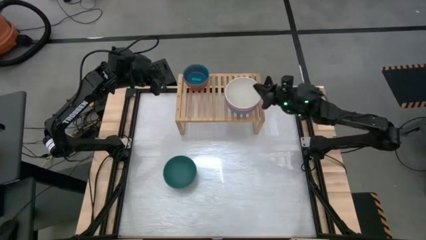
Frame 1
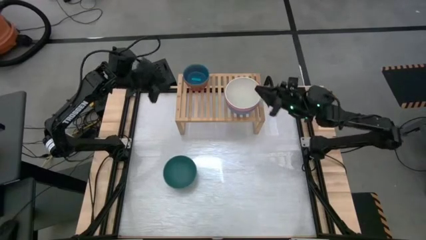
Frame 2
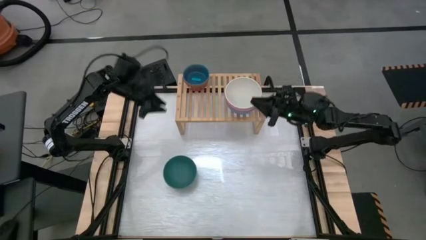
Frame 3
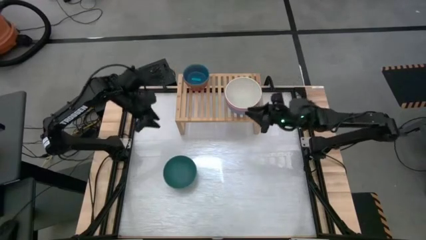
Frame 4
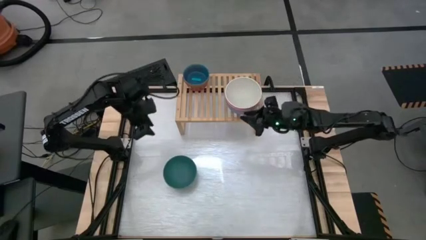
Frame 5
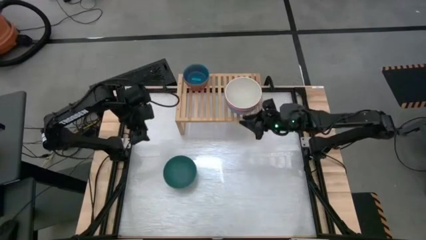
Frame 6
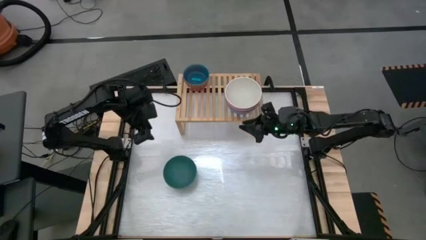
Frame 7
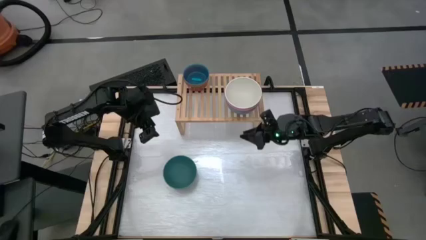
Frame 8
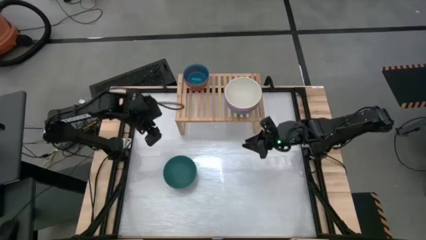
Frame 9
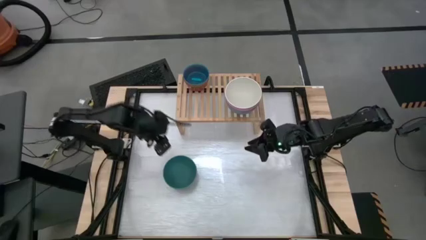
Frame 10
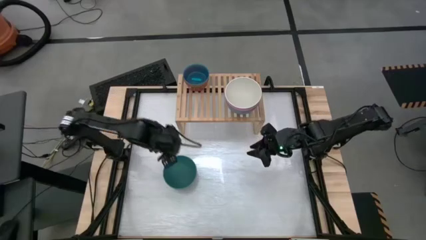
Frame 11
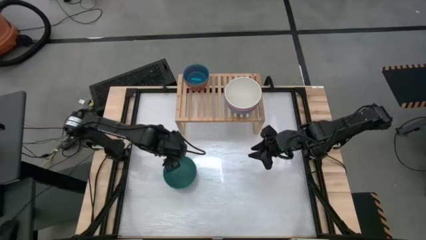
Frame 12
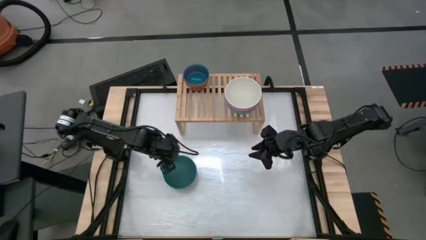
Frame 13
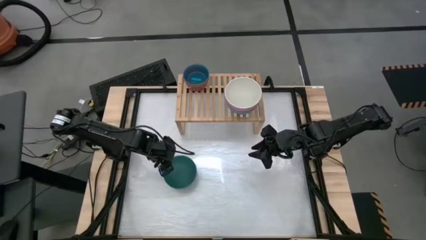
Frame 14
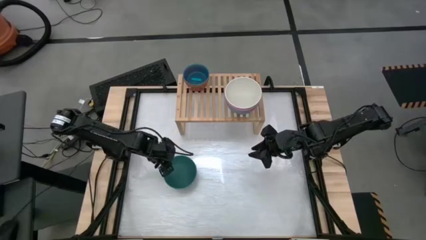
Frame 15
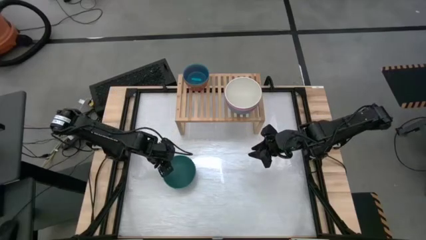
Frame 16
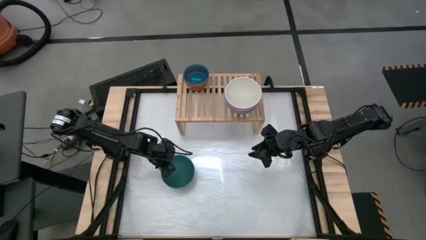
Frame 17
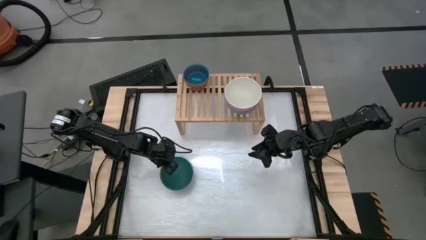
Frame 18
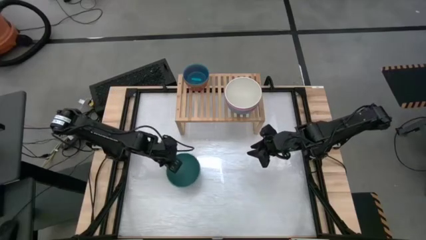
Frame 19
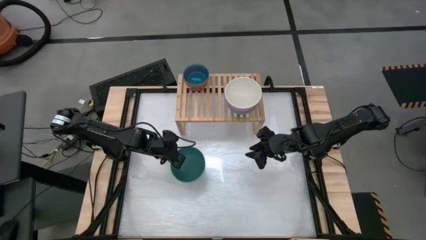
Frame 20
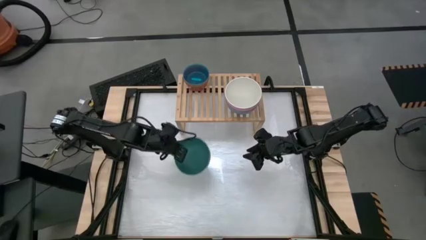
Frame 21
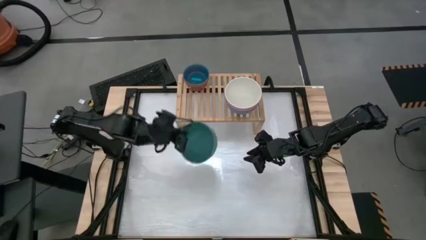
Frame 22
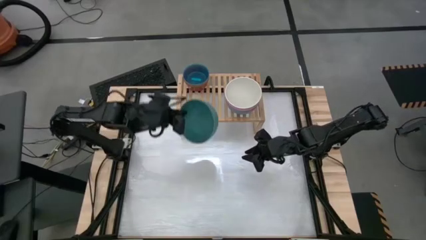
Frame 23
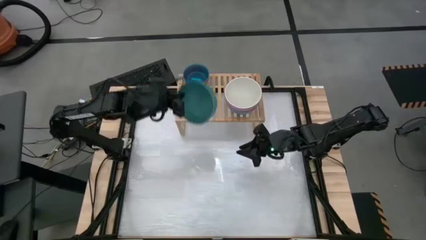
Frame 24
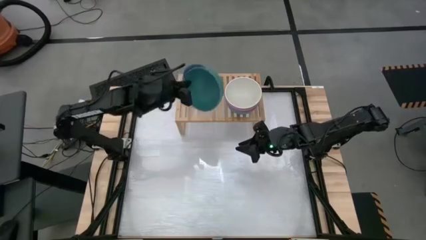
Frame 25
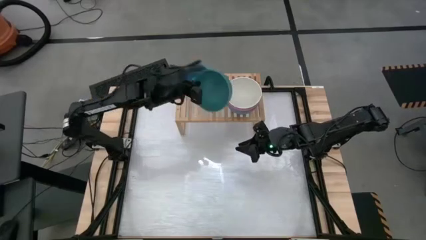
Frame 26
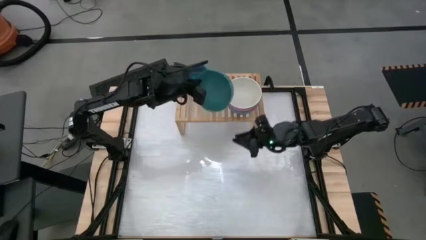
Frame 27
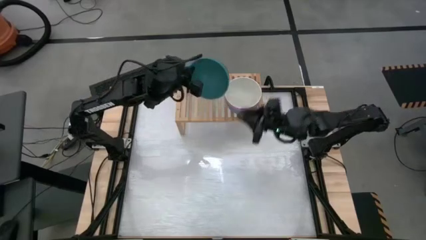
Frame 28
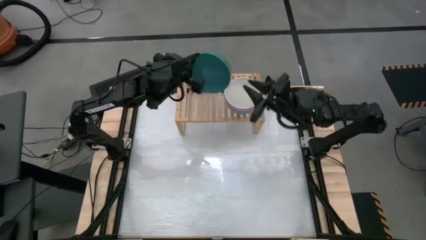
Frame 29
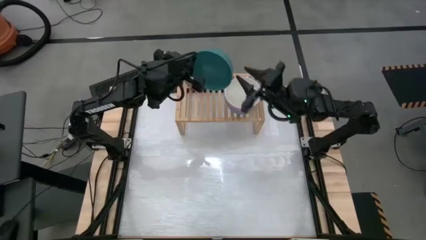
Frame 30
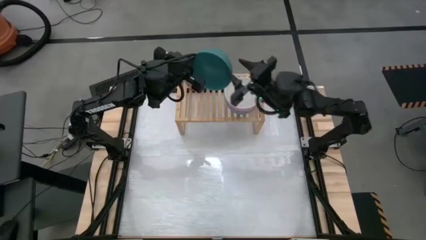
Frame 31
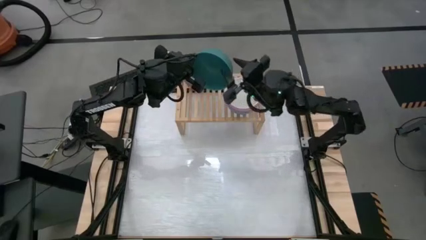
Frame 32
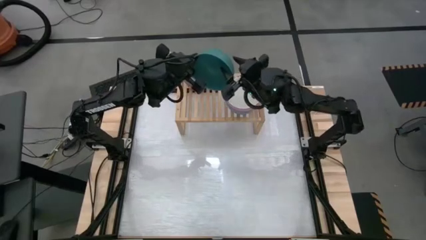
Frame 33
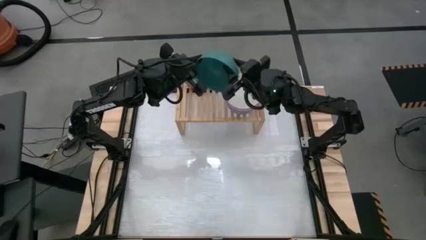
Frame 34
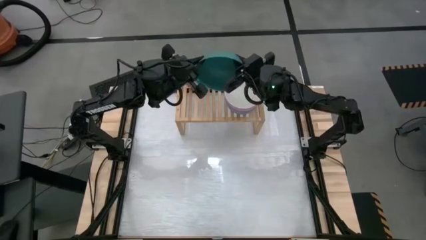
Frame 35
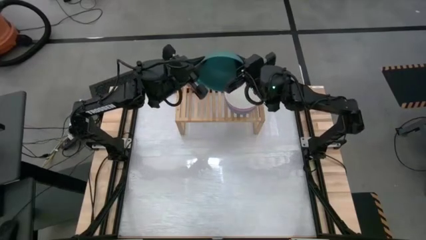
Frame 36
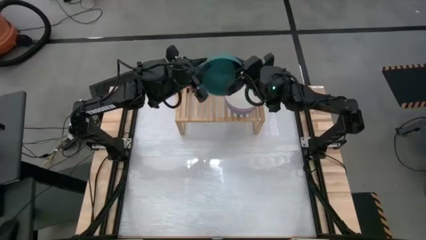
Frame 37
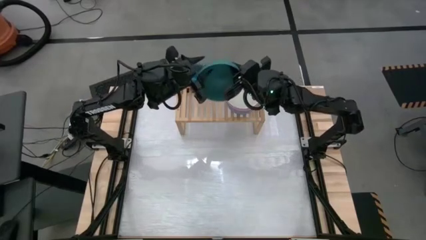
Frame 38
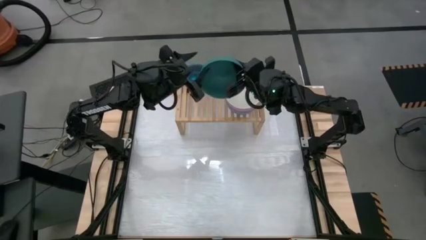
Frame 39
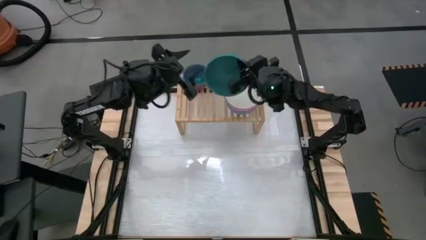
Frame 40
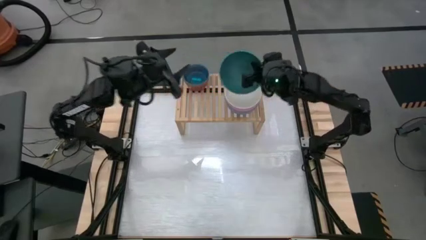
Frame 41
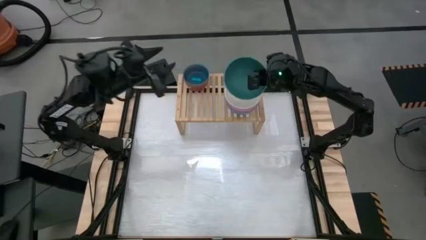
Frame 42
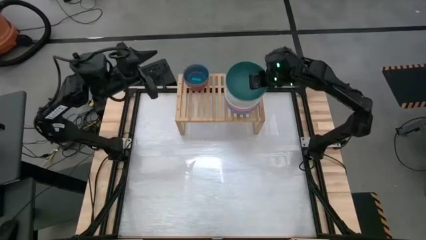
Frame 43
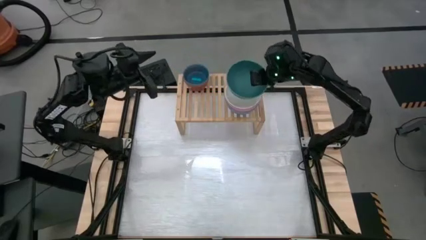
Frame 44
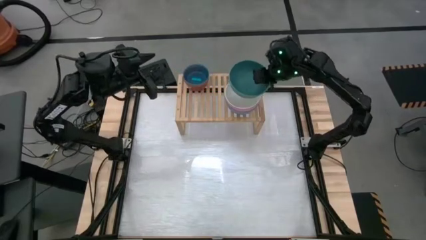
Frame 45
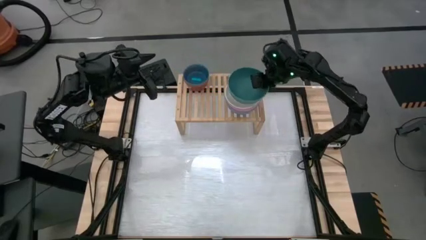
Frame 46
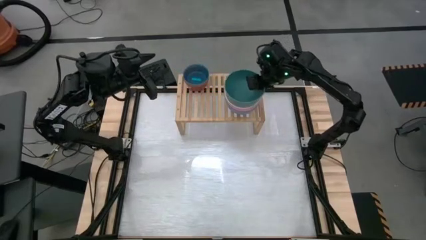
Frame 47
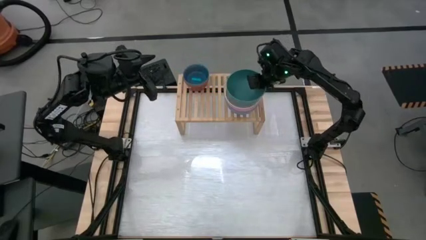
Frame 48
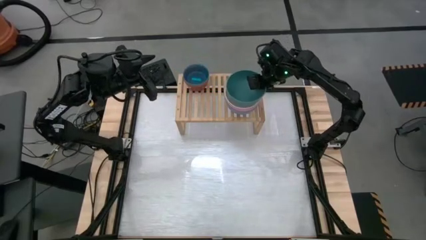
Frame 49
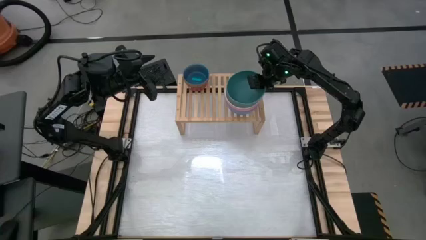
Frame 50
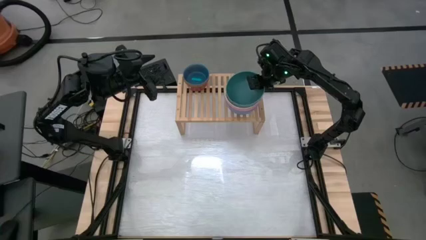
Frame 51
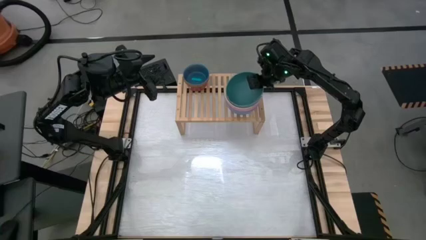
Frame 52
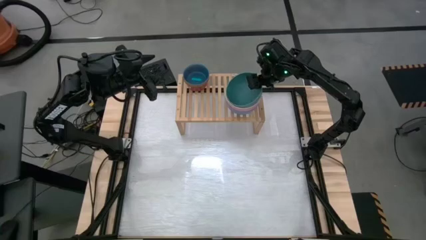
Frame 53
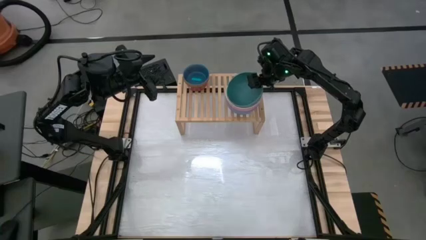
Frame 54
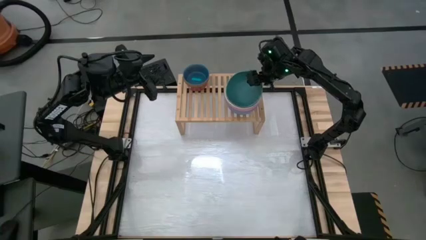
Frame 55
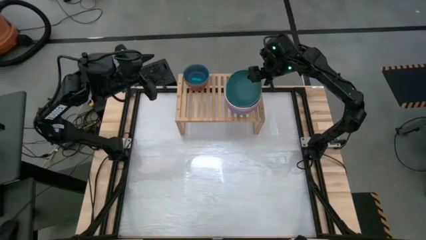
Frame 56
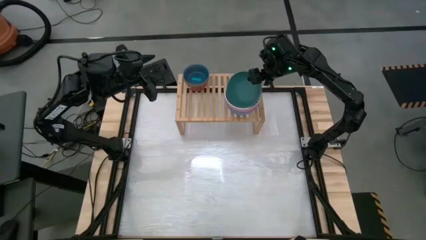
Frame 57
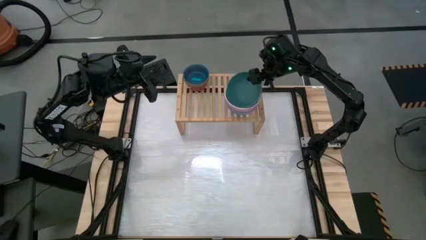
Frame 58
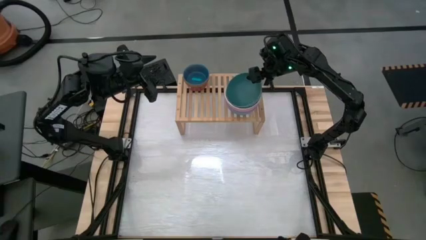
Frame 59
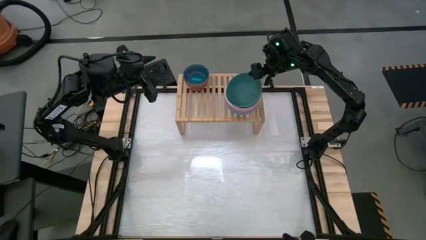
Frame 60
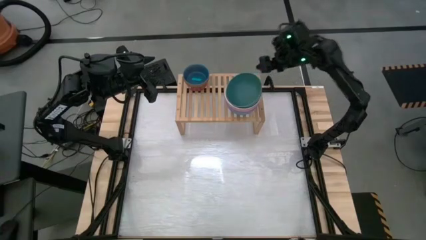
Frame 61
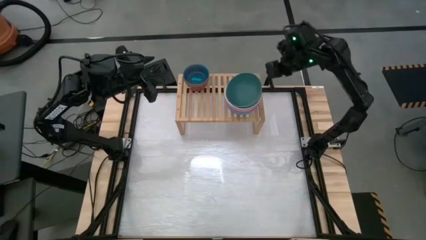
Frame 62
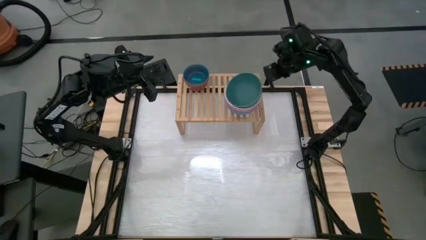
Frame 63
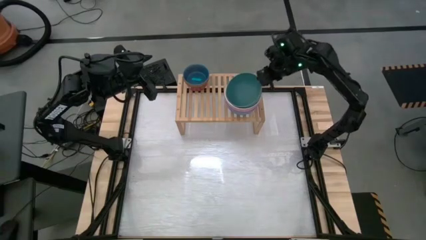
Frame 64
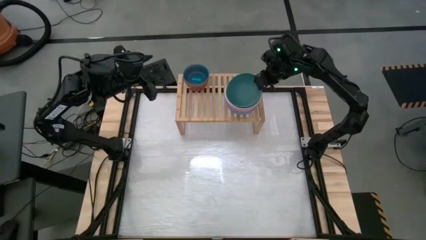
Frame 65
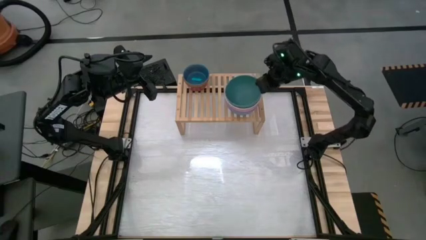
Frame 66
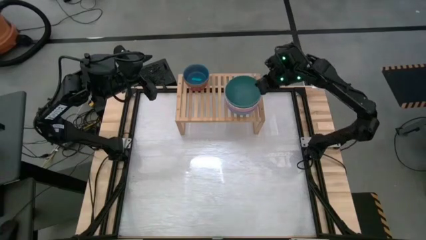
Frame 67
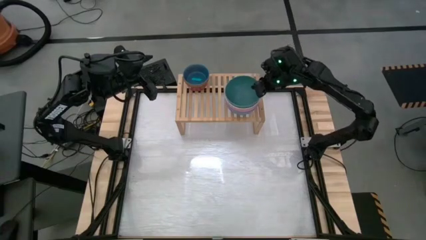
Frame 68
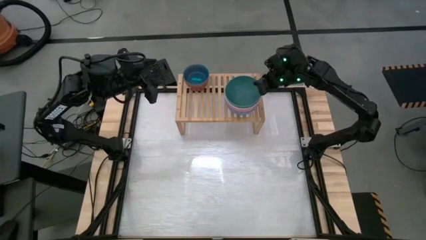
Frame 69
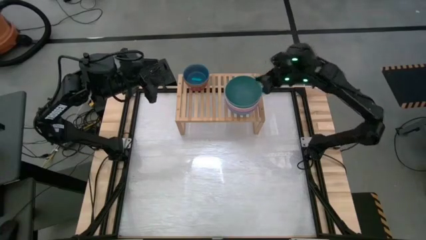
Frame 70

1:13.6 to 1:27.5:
Task: Place and stack bowls onto a shelf
Stack the green bowl on top of the white bowl on the shelf

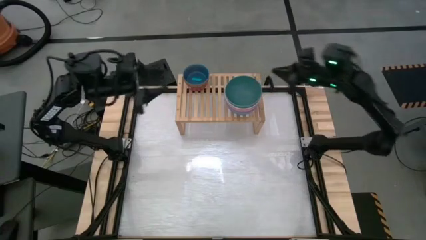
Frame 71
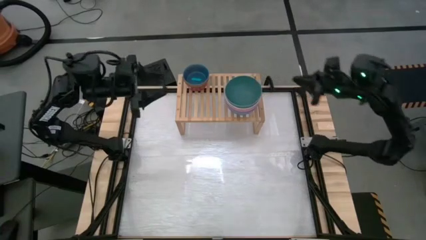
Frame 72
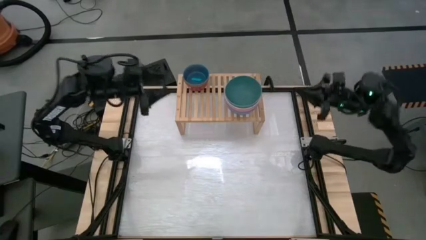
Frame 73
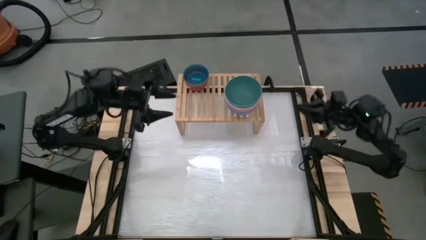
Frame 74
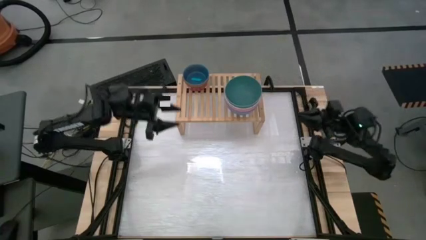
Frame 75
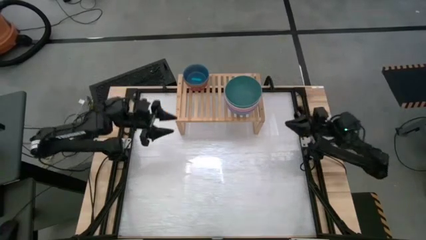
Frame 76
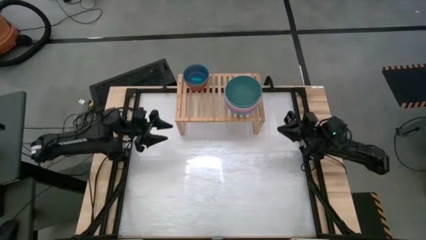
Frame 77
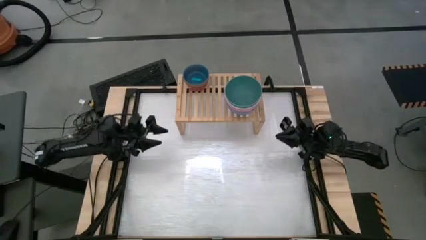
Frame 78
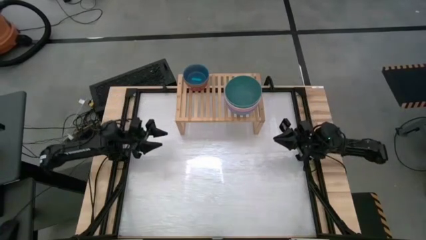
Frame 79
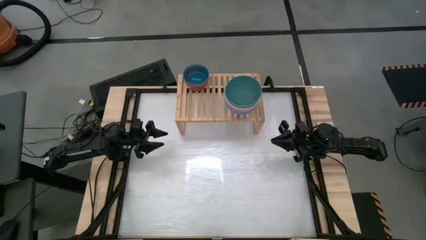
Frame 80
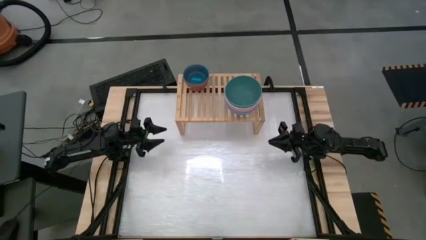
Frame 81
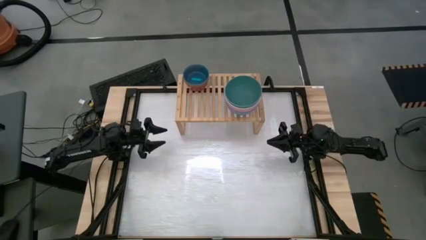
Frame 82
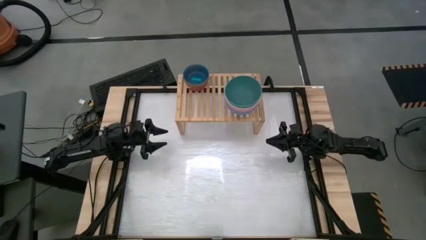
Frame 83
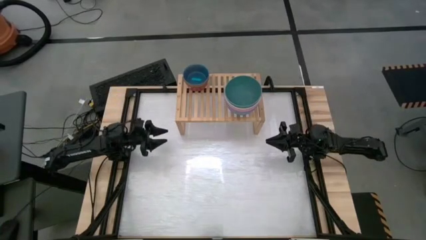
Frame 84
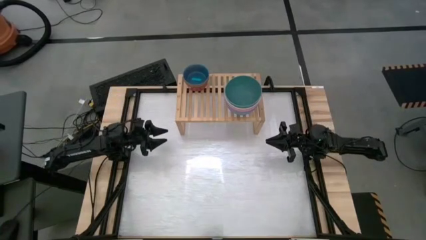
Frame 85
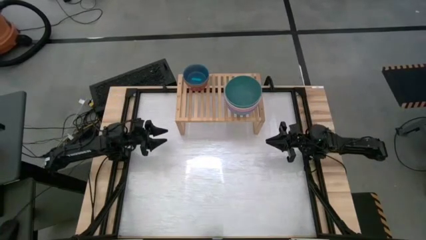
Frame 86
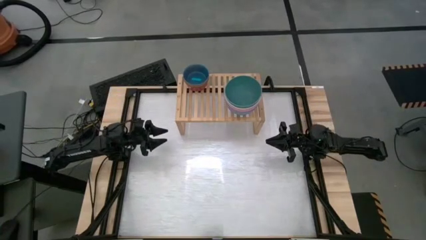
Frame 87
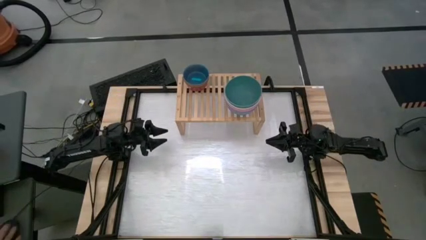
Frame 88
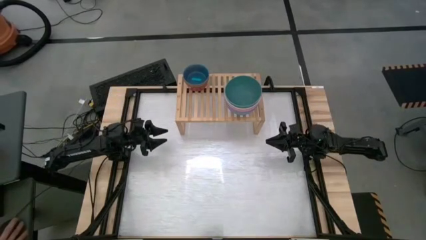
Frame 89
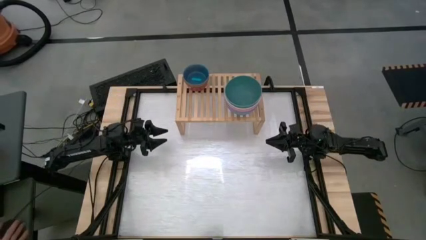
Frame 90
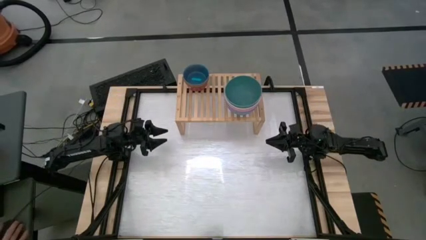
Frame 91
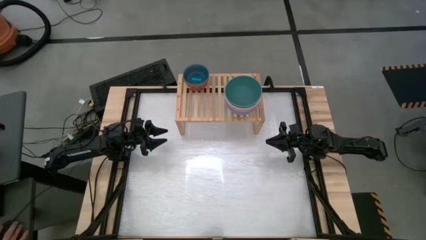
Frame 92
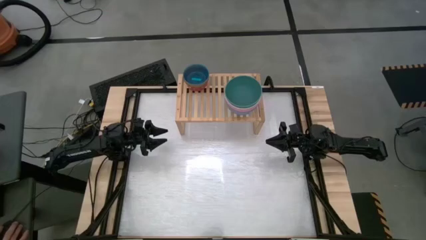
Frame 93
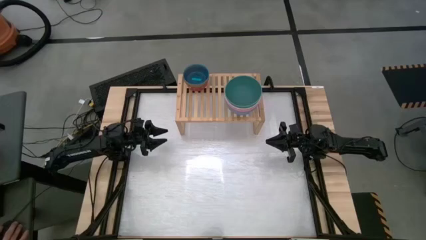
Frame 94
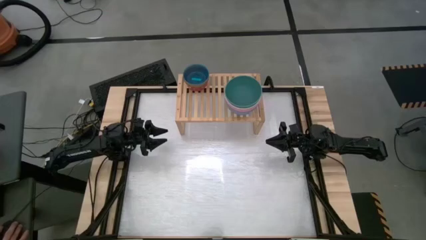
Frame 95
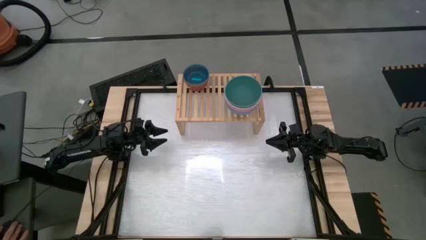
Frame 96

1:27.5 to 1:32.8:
Return to home position
